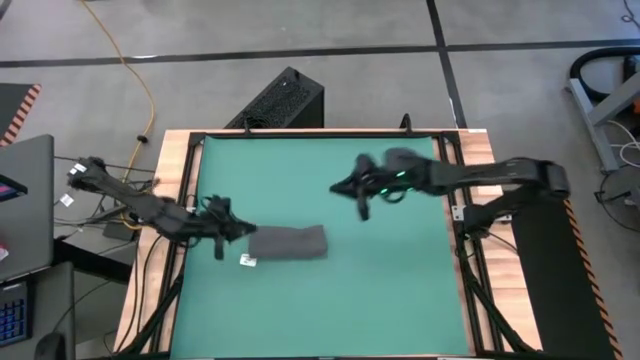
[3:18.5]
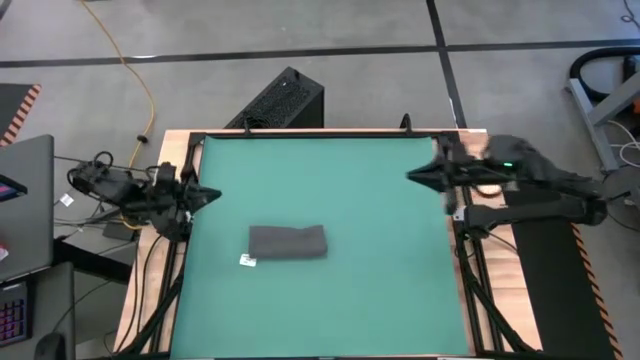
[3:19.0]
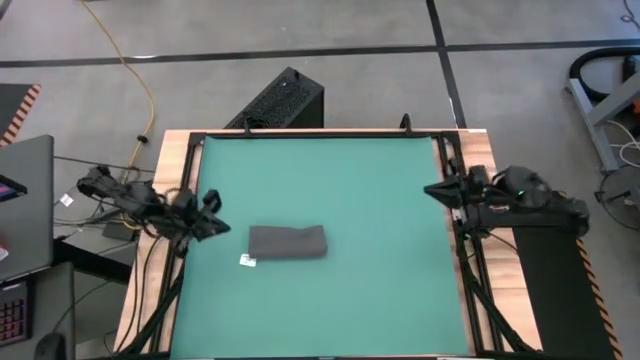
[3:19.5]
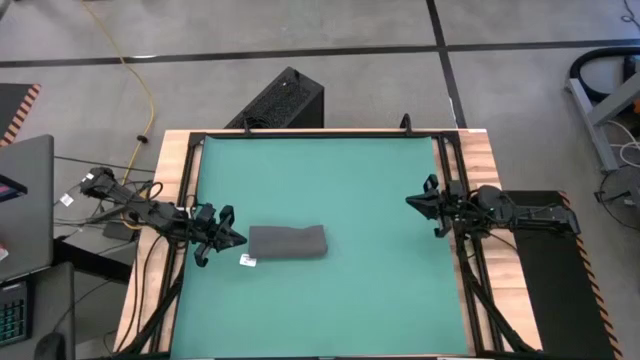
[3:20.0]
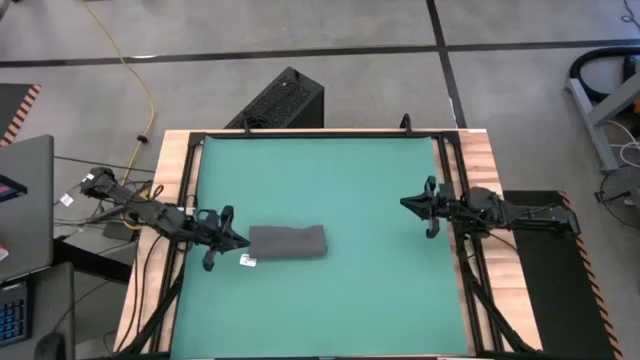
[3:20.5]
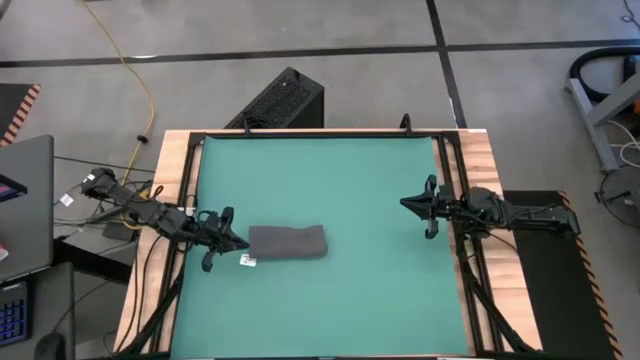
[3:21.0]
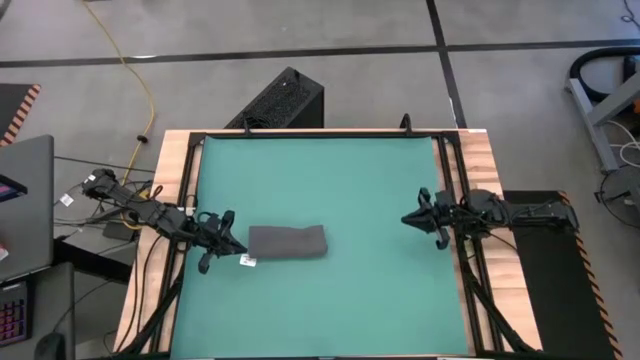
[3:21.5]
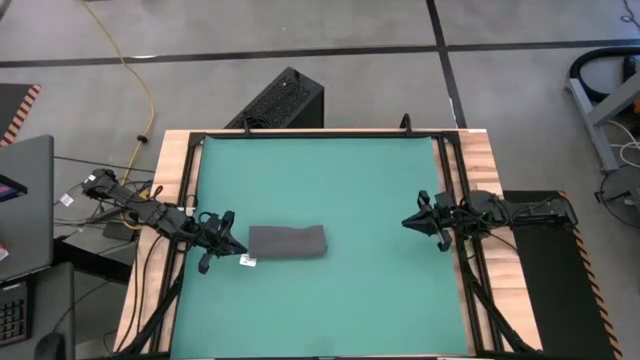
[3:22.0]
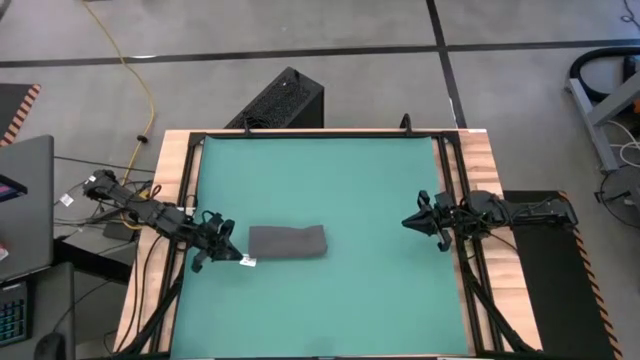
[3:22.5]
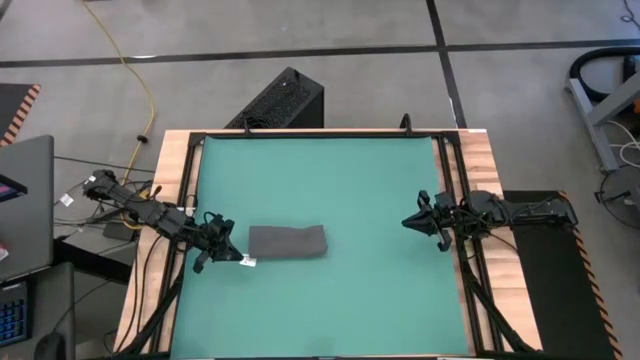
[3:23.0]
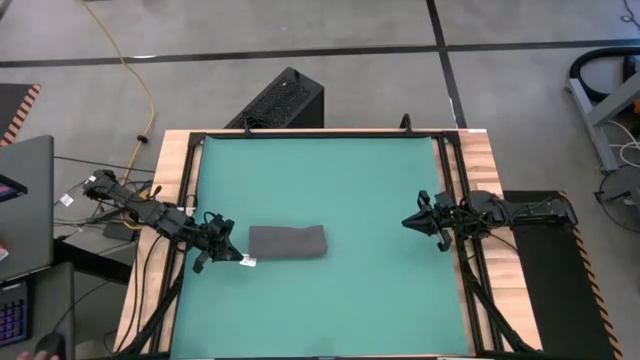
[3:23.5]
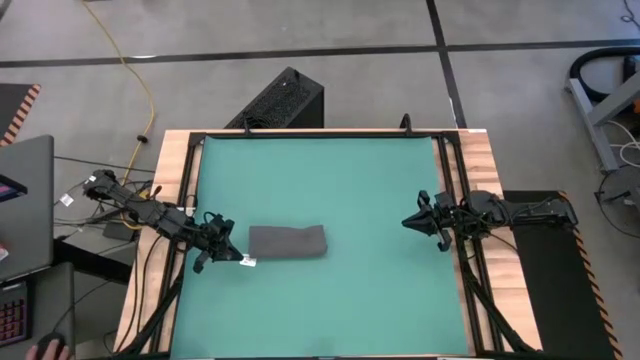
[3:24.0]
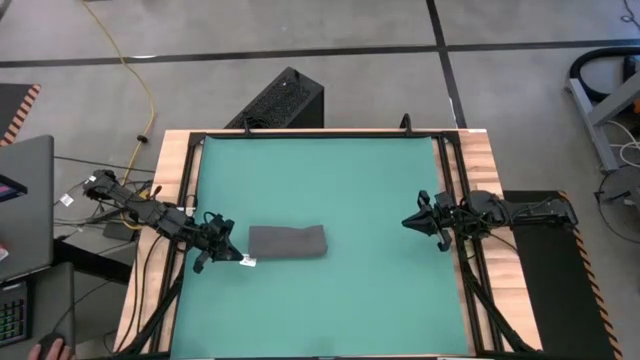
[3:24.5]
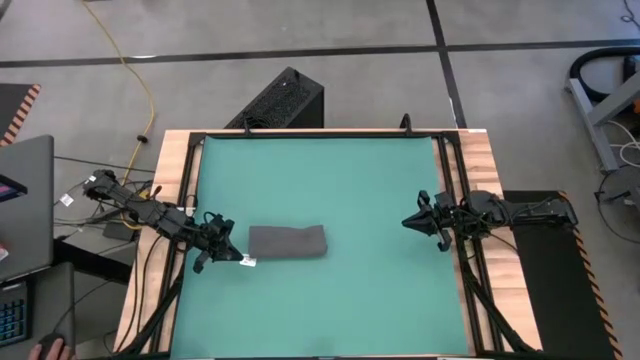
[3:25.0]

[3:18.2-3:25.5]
Task: Roll towel
Return to Home Position

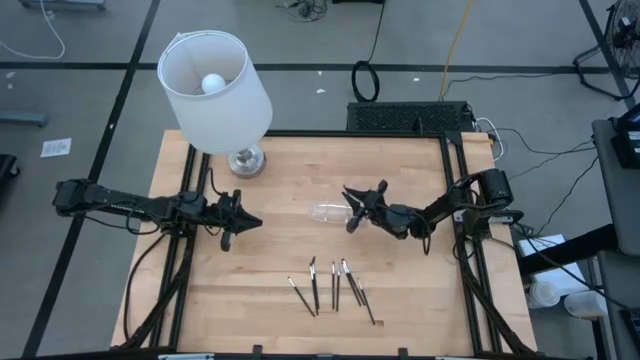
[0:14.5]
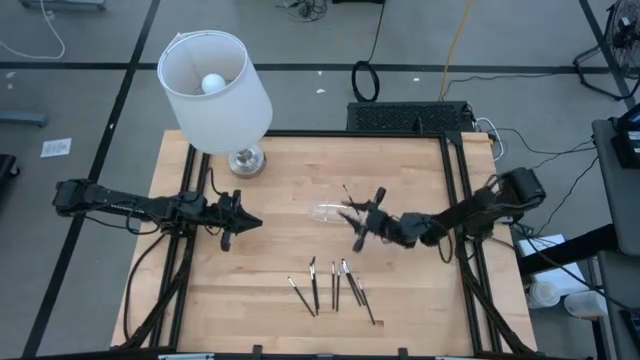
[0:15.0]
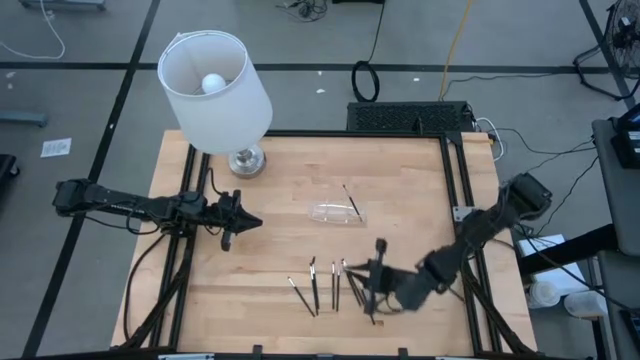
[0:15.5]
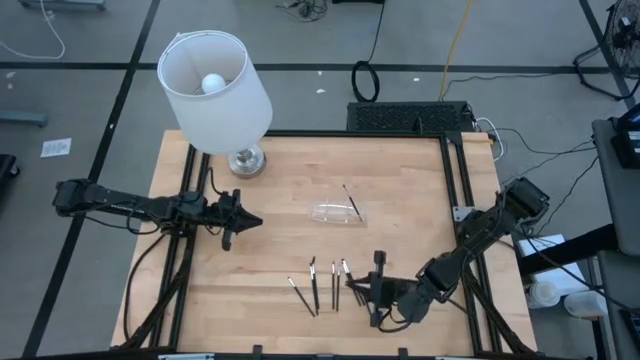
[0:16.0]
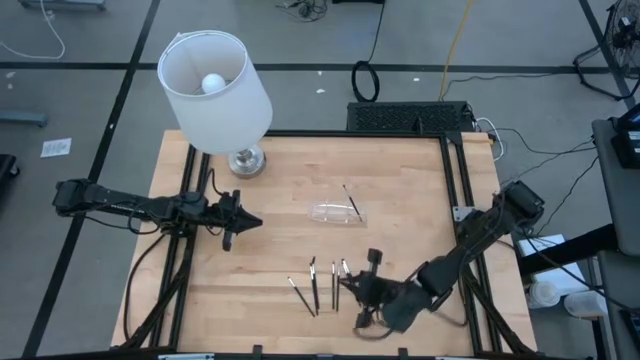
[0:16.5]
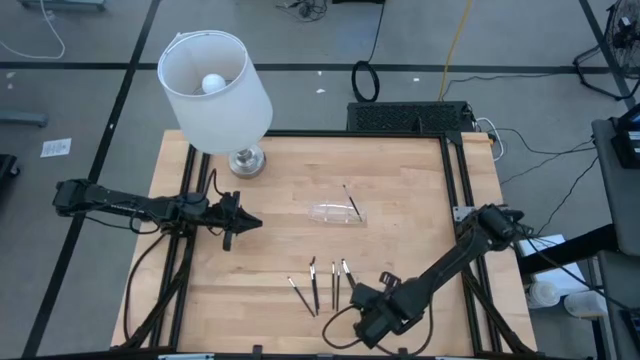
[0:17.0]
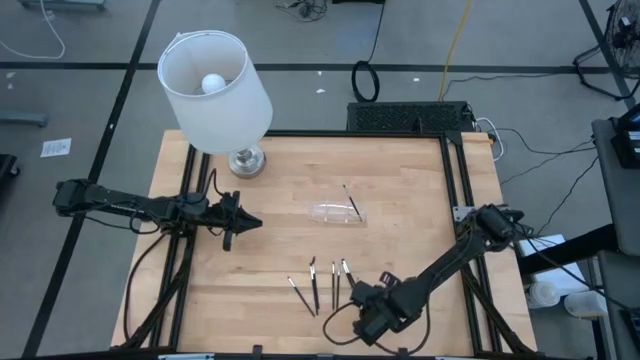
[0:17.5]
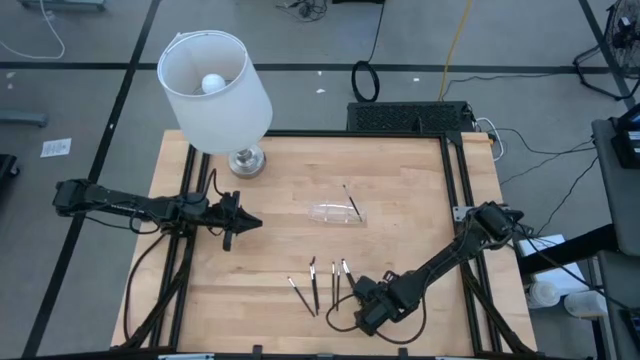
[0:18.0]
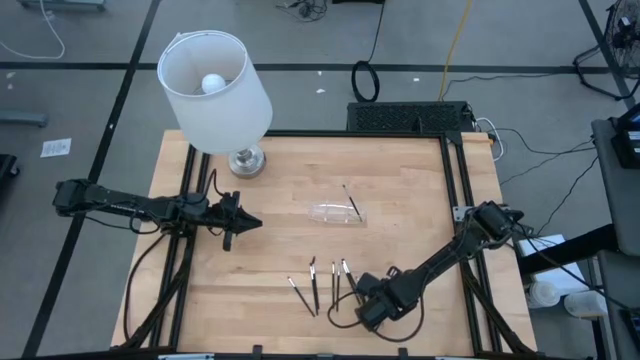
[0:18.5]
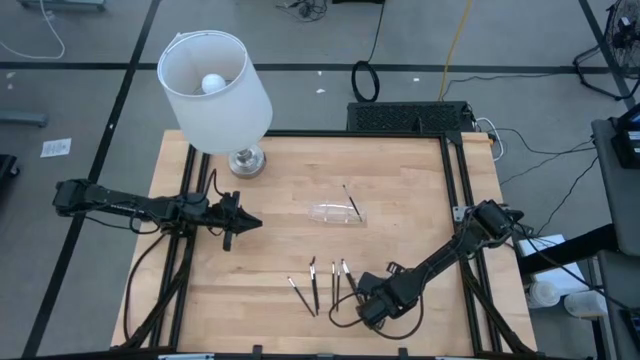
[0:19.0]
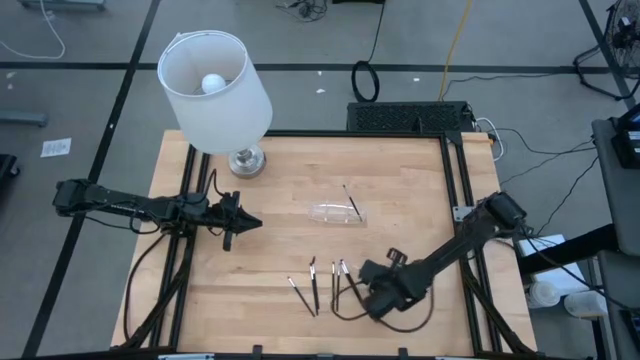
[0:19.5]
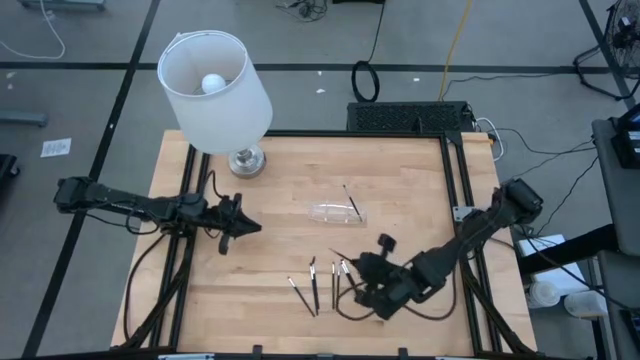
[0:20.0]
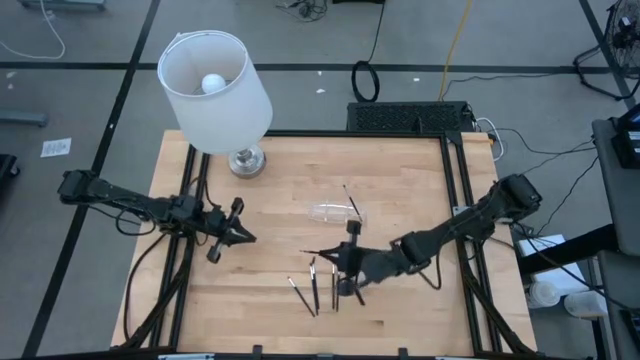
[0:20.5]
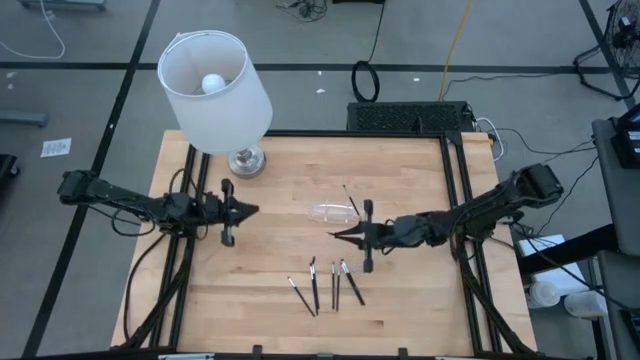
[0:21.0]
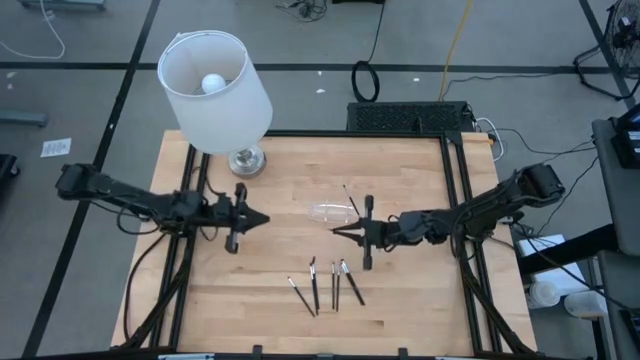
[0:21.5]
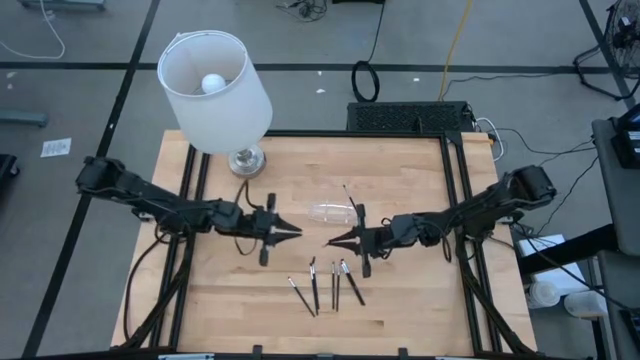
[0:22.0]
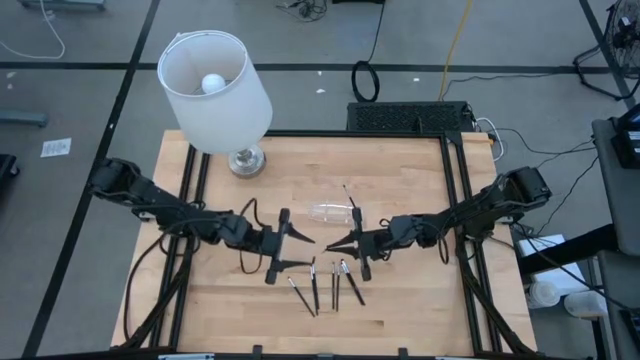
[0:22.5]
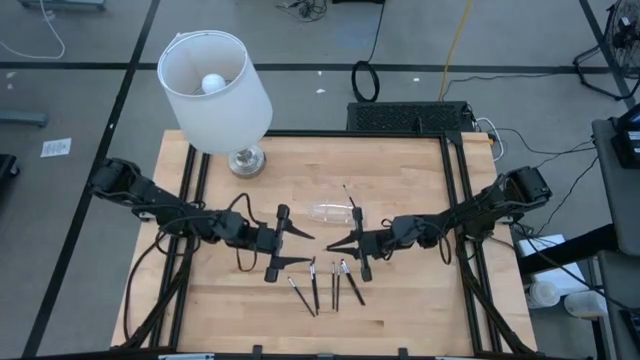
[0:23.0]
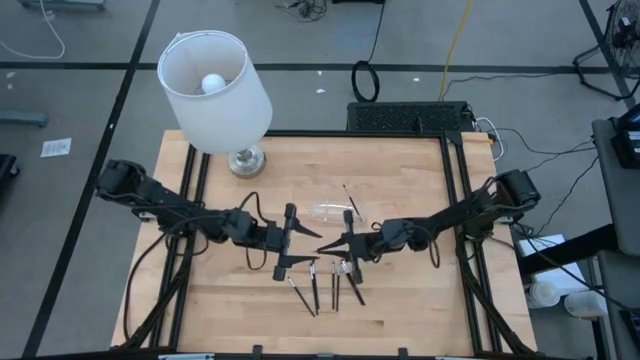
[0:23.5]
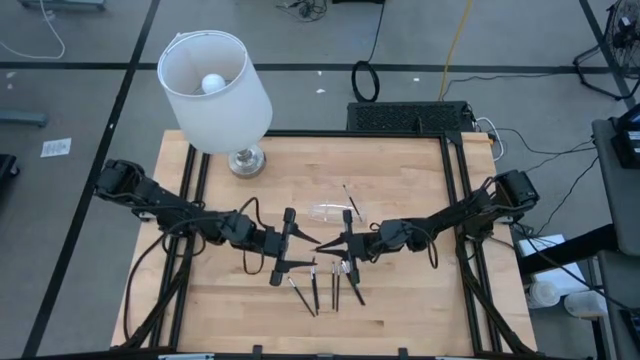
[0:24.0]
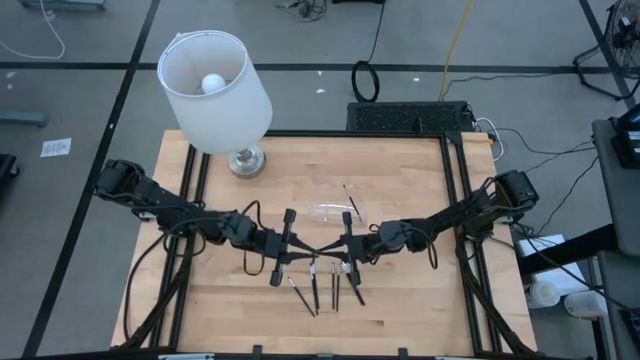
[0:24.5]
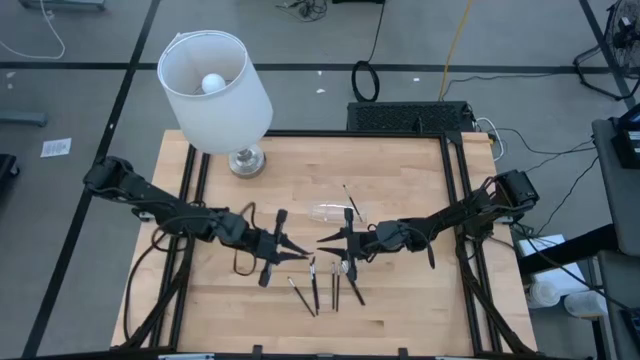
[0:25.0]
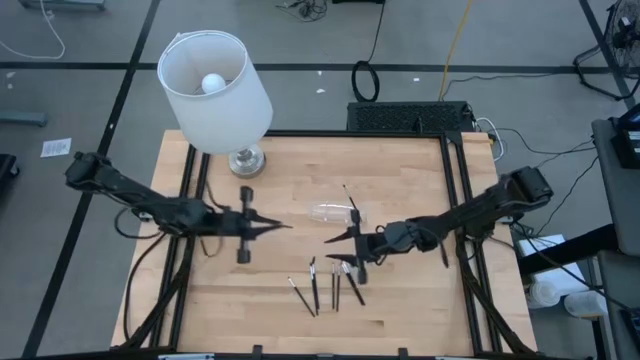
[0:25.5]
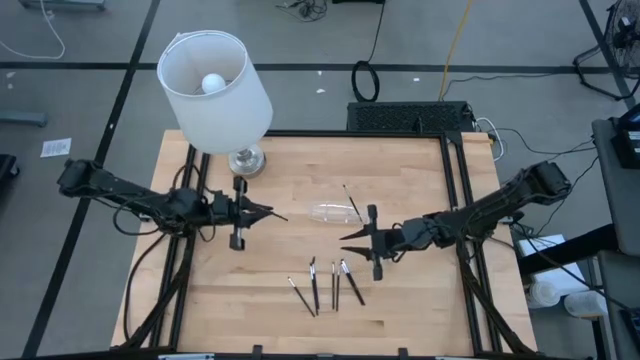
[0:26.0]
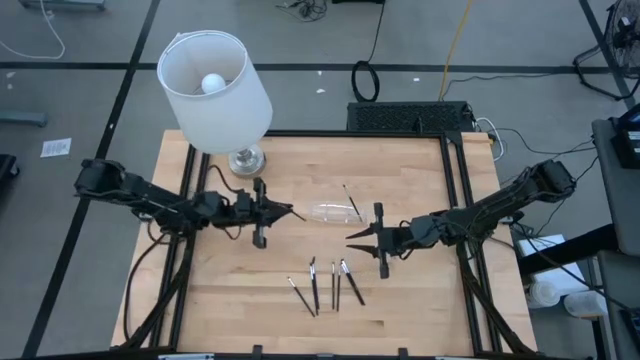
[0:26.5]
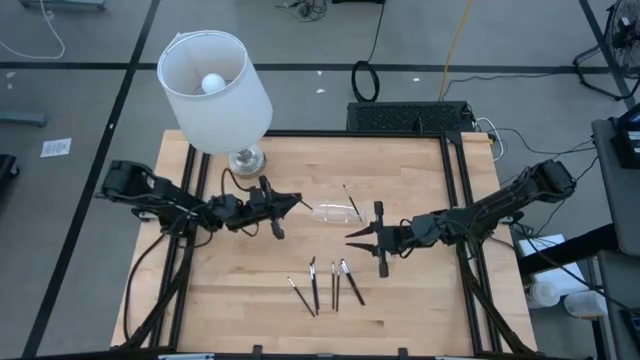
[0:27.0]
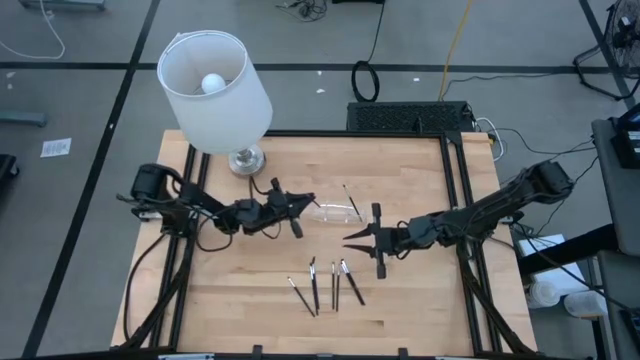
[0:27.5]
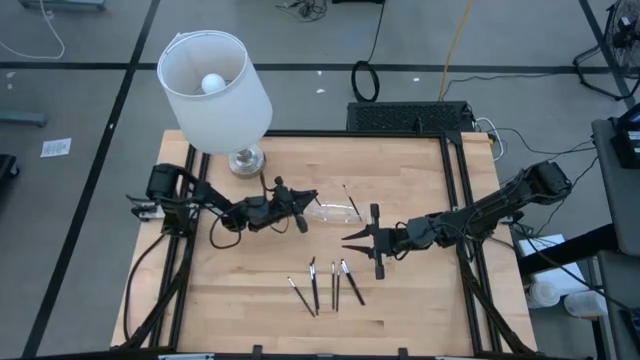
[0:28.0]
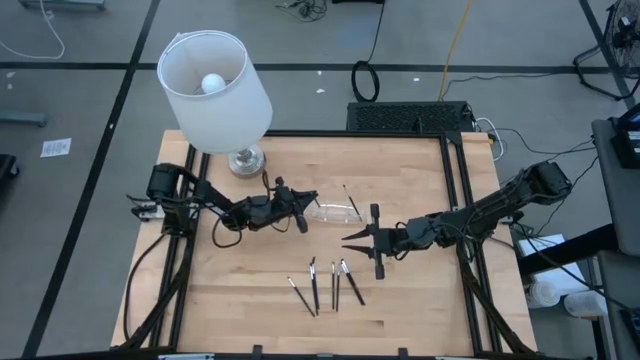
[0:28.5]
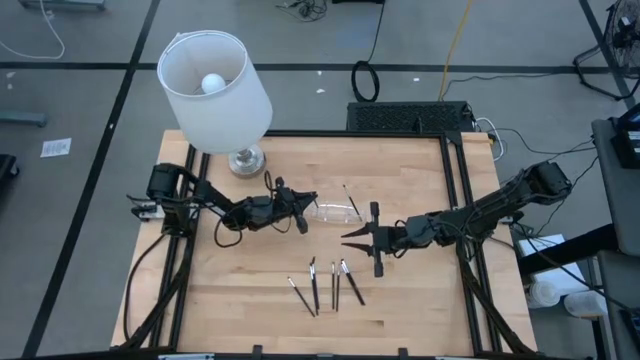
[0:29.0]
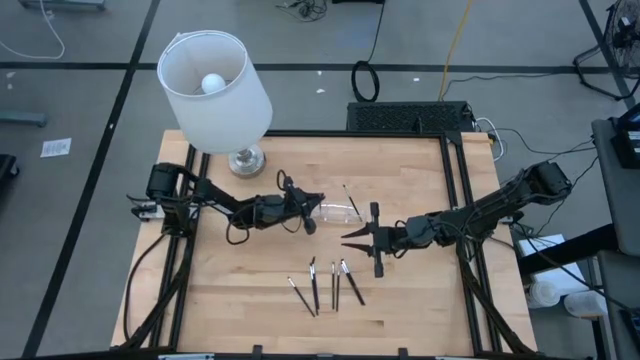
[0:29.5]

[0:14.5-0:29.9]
Task: Put items in baskets/containers
Put the eyeshadow brush into the transparent organizer
